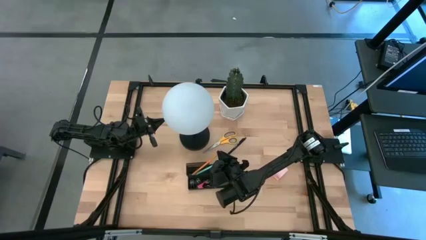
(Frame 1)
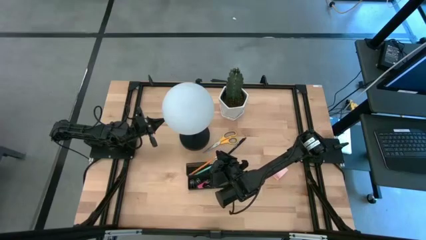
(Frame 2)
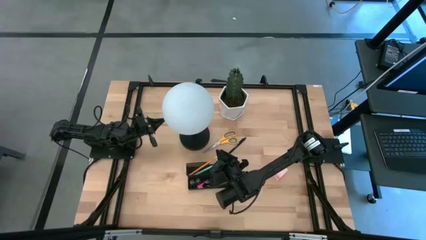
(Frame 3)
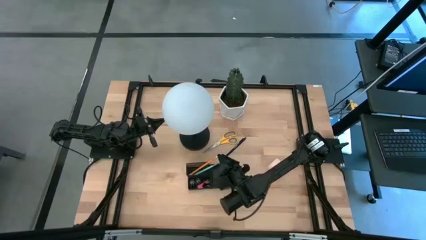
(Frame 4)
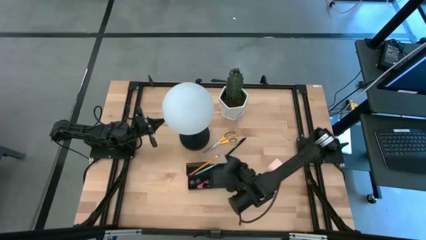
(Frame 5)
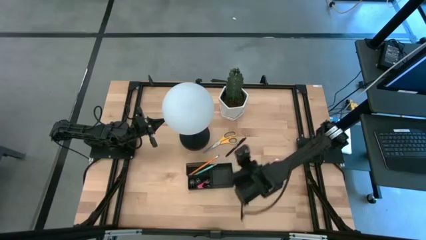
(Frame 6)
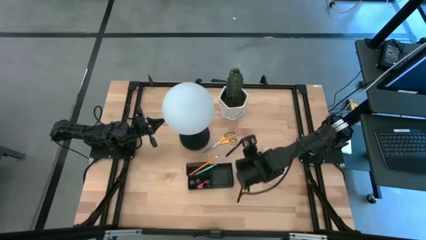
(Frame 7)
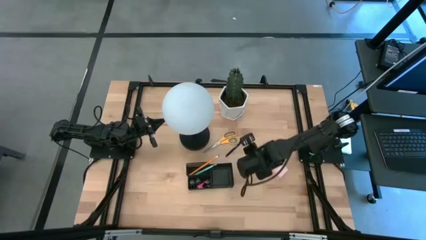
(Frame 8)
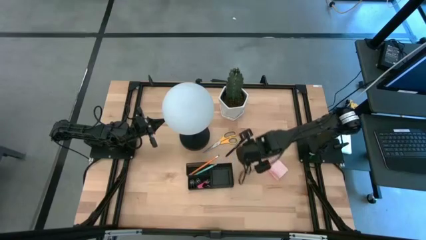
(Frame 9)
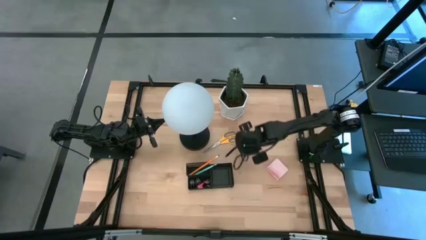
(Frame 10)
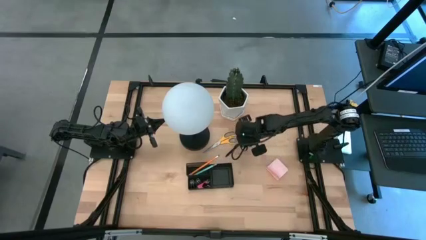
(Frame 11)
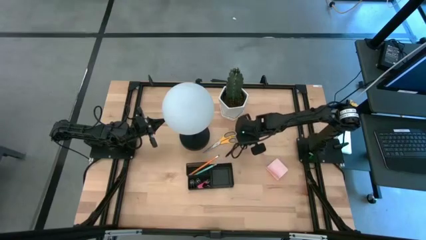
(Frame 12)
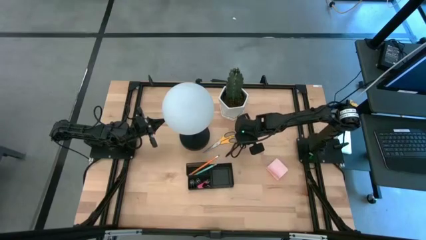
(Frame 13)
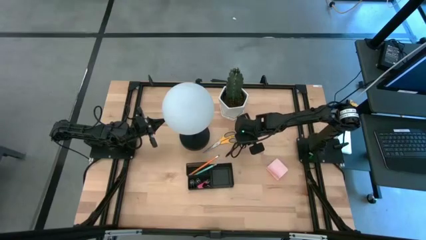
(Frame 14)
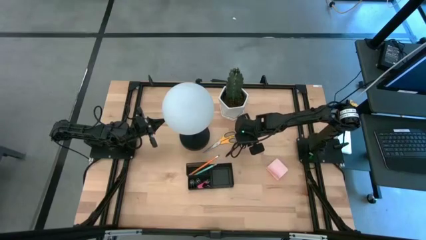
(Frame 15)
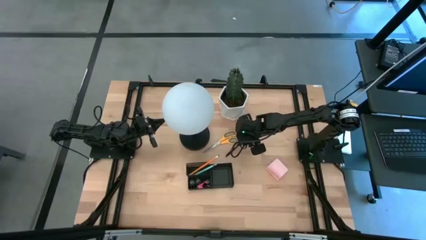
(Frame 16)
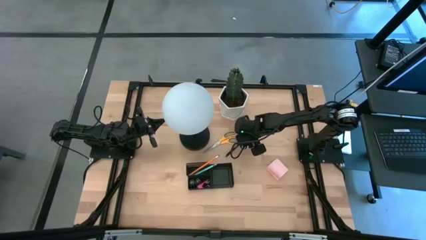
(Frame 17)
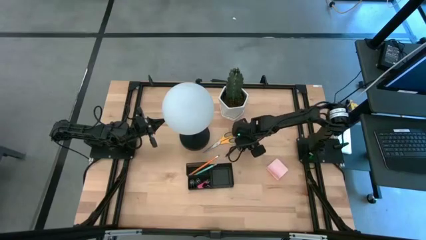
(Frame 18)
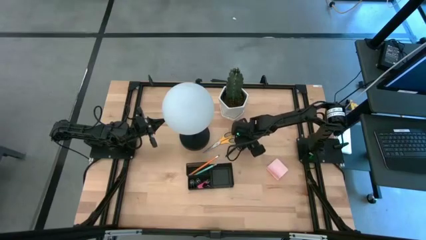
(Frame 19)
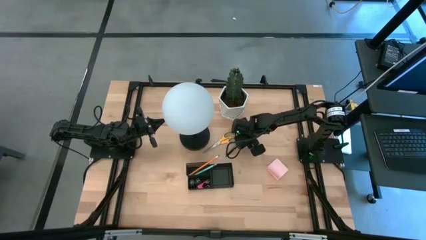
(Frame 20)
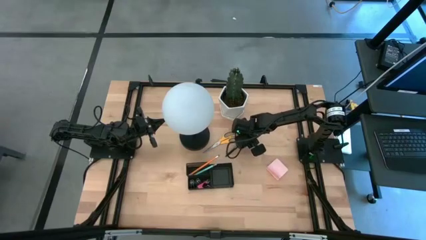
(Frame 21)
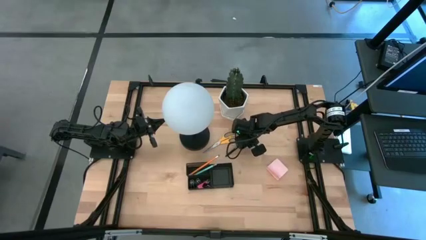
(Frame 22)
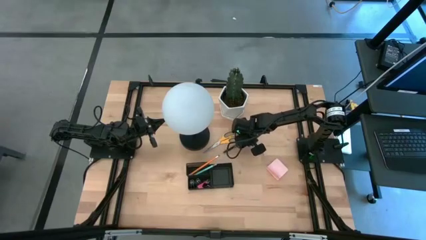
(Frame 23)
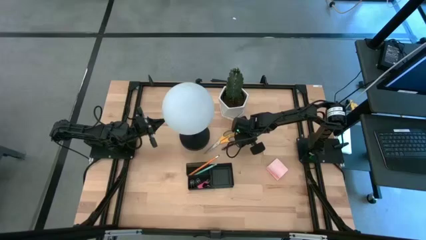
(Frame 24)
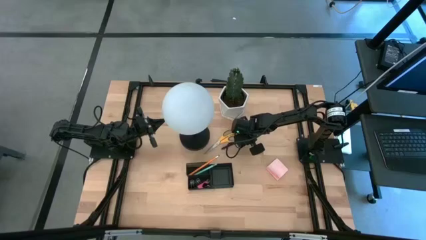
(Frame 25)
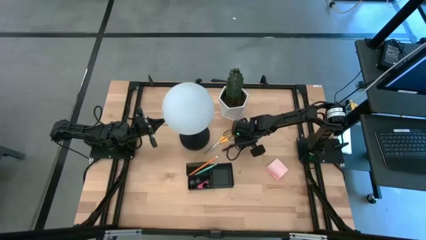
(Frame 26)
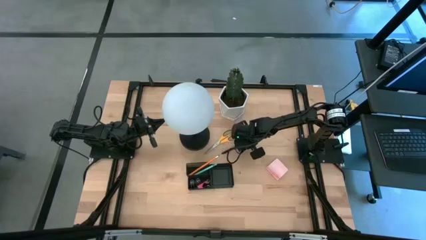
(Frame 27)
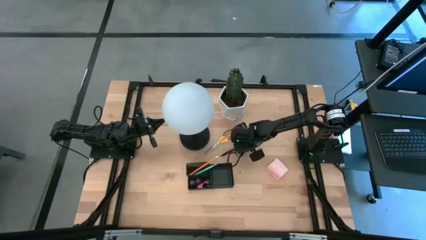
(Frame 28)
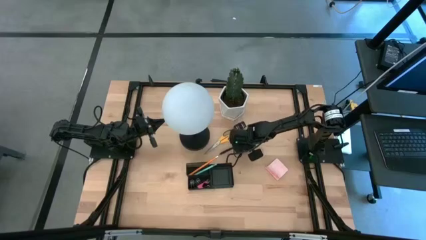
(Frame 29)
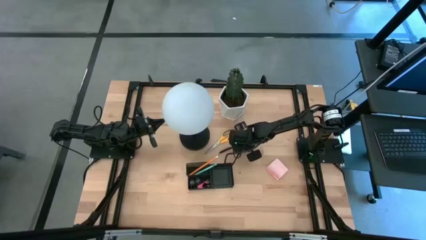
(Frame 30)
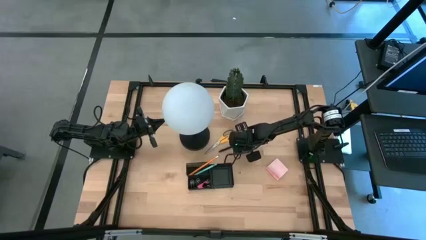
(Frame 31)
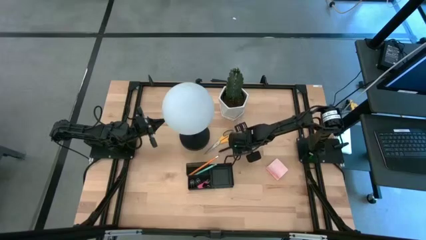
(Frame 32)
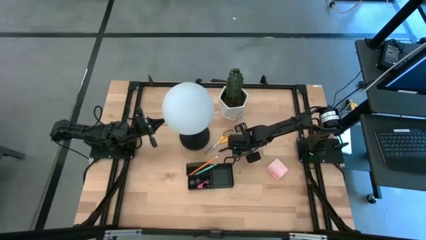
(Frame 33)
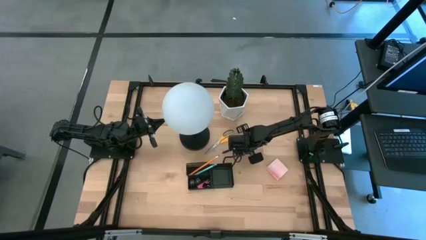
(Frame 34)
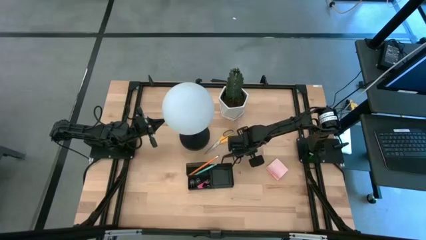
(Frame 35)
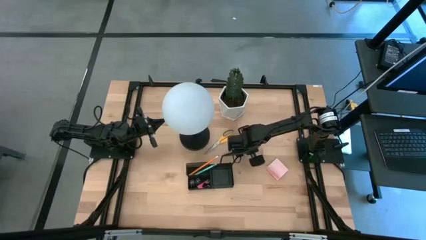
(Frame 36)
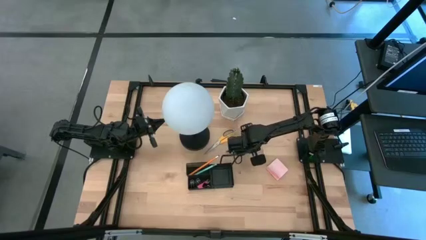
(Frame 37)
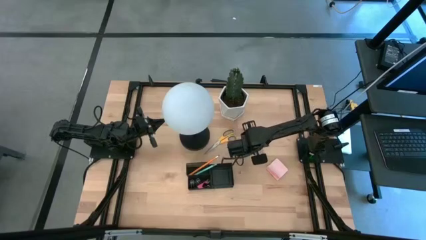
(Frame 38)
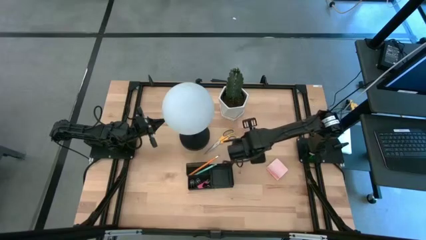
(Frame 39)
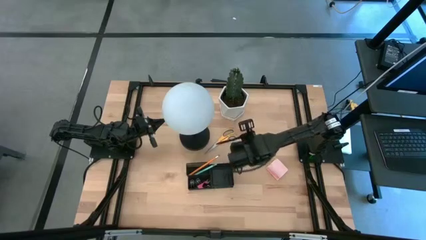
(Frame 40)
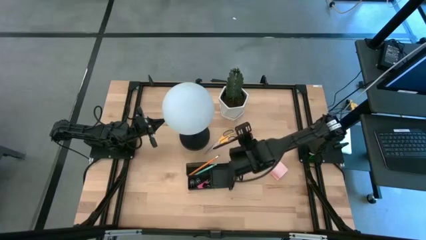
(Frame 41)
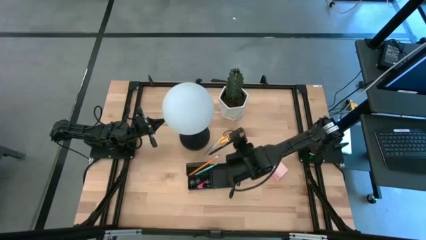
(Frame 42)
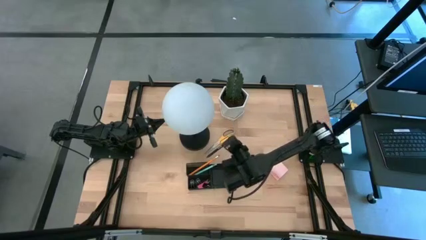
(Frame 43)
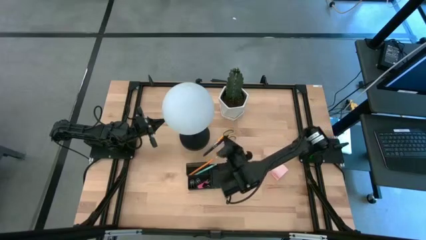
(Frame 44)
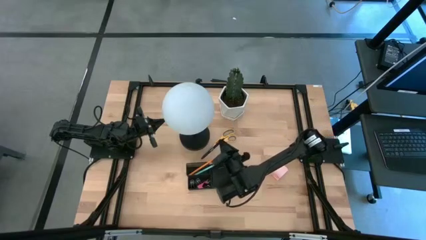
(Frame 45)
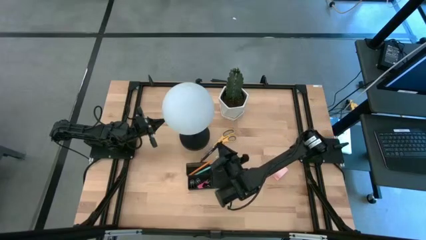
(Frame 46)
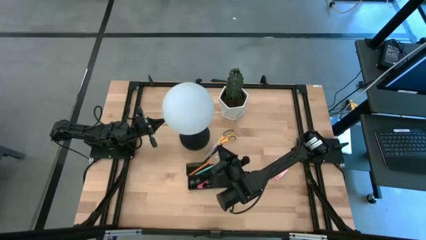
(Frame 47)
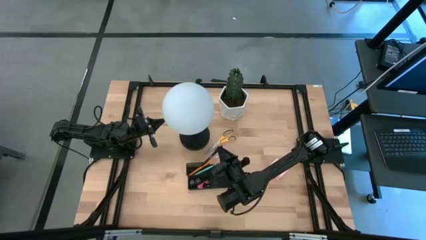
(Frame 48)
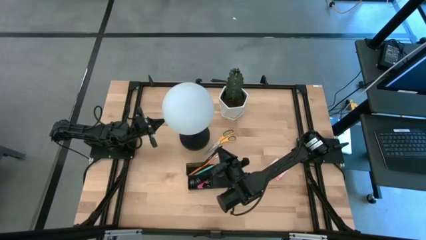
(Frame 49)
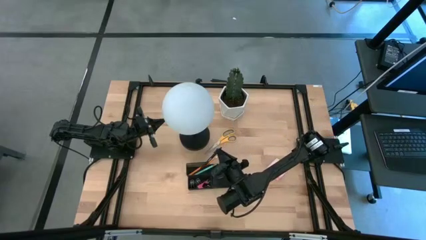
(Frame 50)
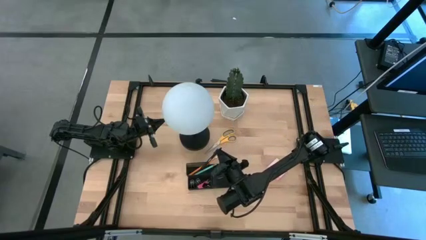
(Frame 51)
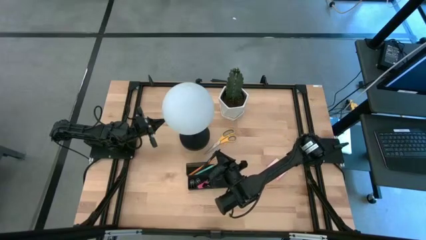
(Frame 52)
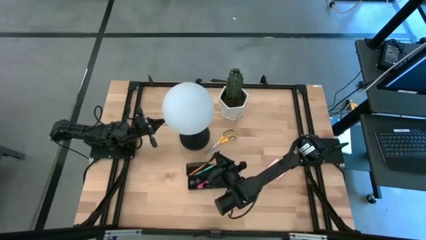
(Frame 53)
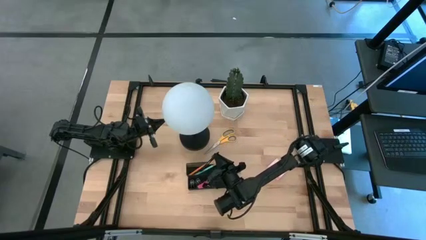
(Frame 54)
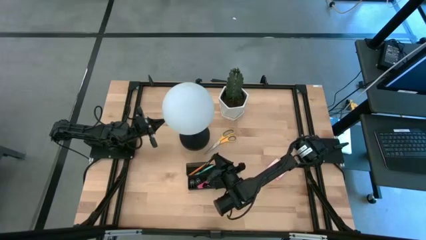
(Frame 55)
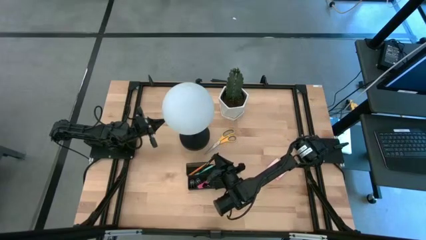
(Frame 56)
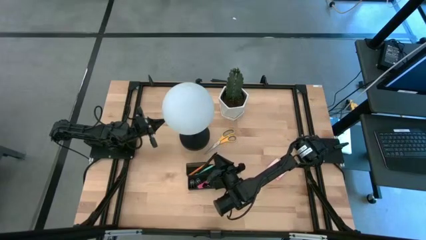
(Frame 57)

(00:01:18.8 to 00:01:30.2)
Task: Pick and place office supplies into organizer
Put the black pen into the desk organizer

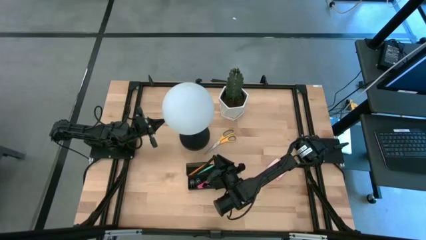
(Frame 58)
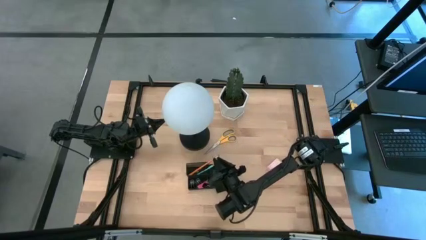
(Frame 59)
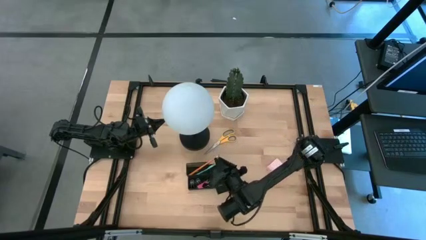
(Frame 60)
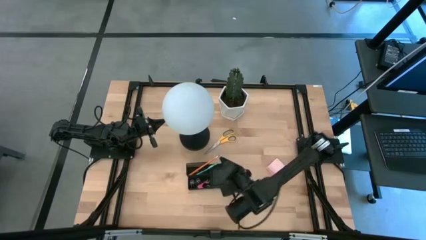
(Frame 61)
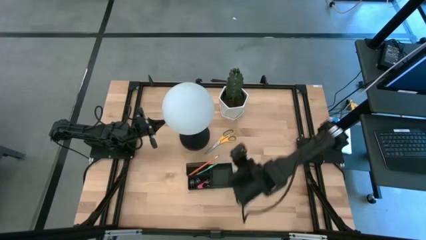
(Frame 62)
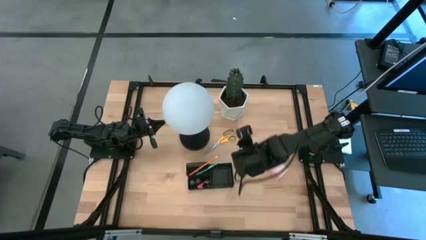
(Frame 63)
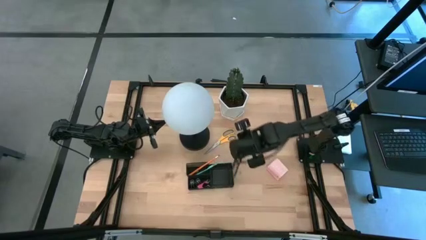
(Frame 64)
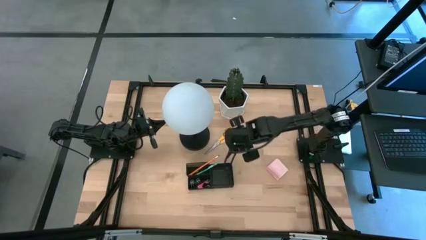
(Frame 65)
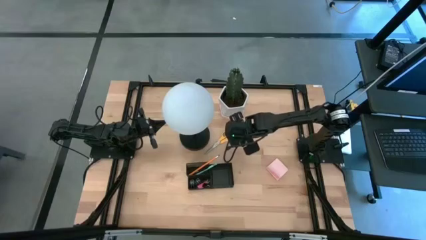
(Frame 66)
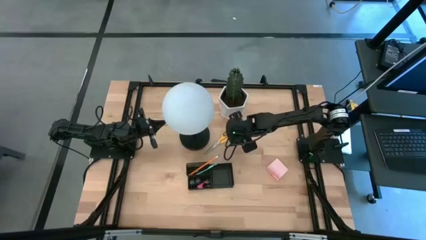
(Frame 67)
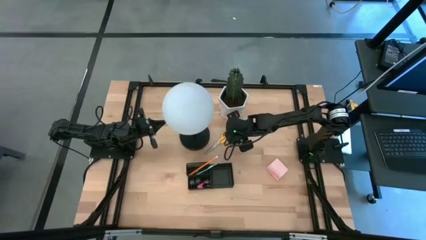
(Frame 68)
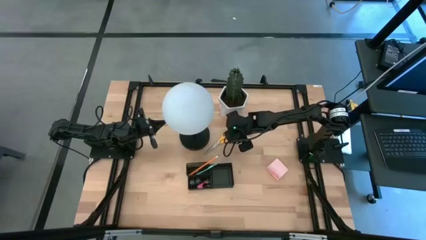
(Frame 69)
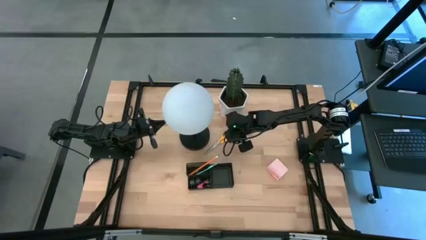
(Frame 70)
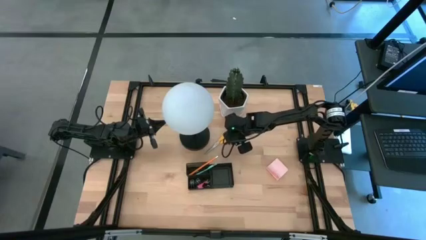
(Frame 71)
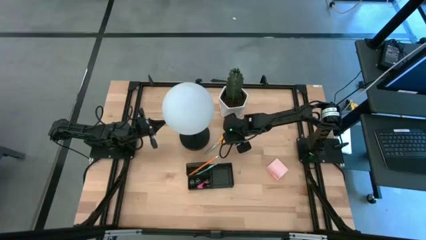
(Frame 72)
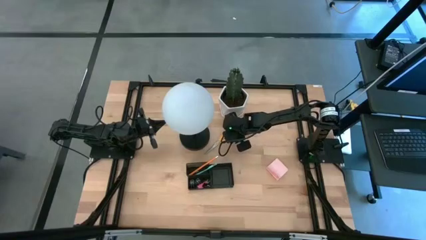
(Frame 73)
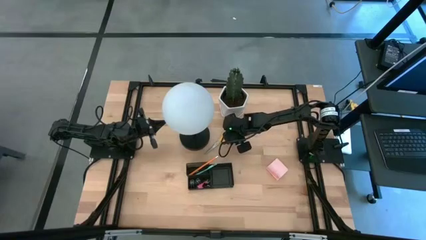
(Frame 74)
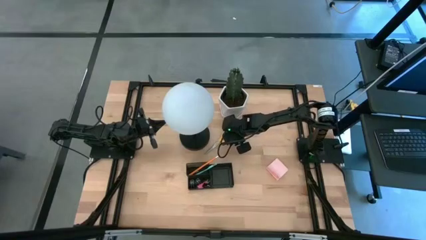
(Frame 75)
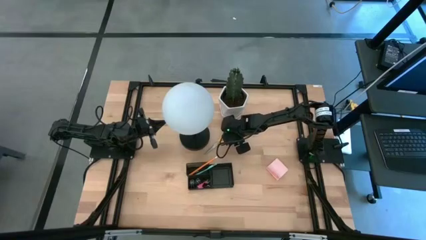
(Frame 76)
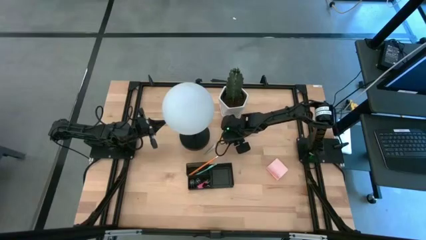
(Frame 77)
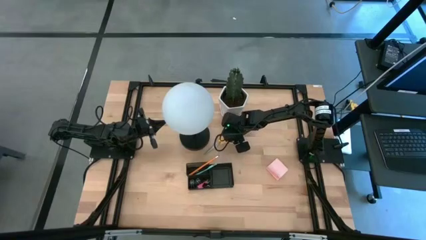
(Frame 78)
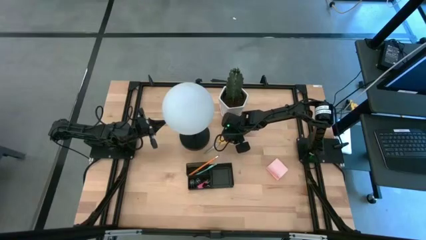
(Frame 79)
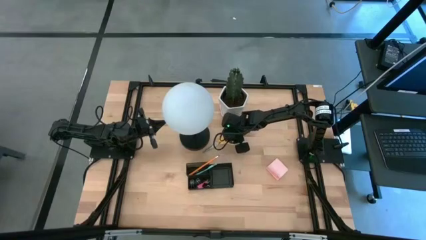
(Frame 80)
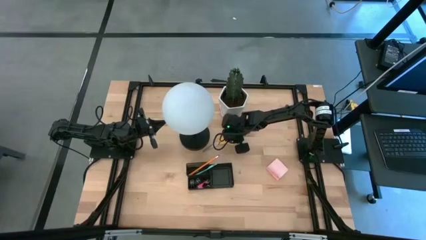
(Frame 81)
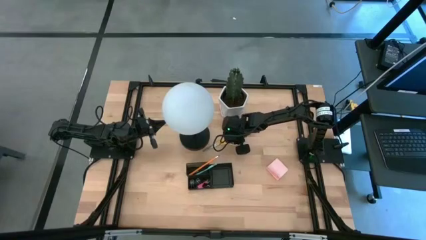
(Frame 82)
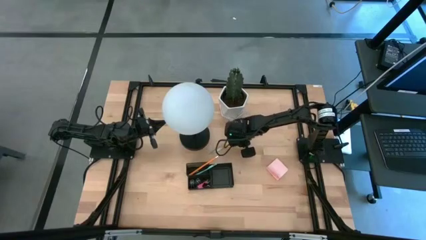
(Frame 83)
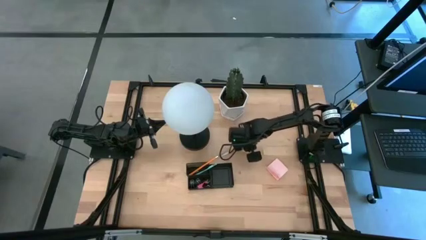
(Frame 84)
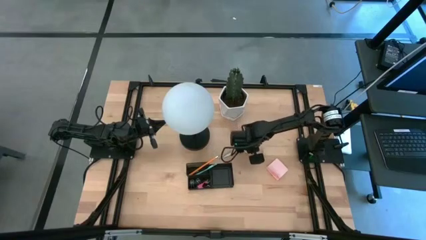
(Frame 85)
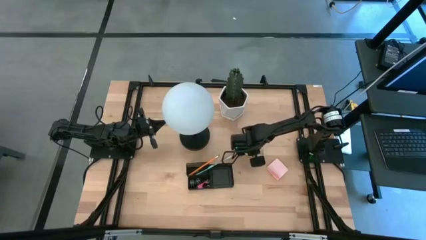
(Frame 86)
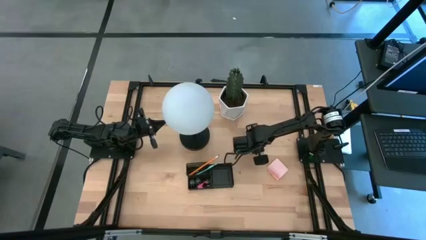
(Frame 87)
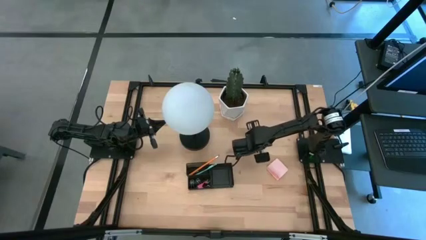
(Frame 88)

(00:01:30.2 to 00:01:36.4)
Put the yellow scissors into the desk organizer
